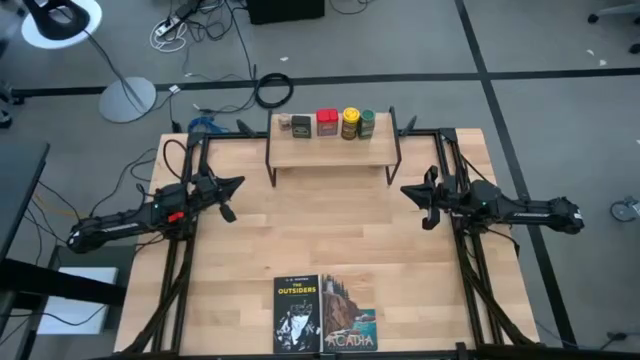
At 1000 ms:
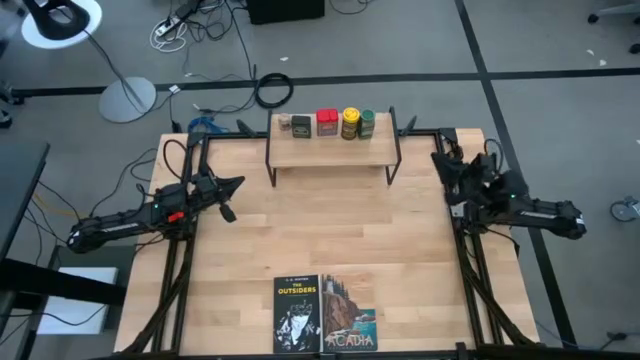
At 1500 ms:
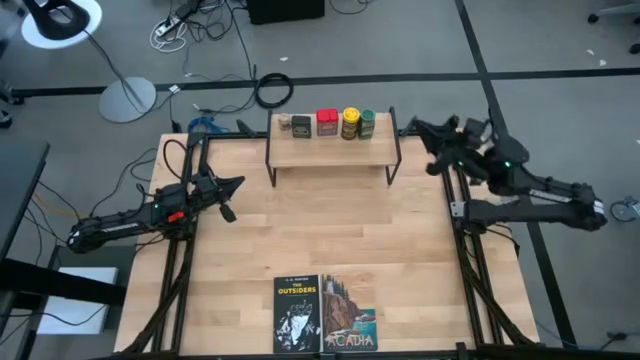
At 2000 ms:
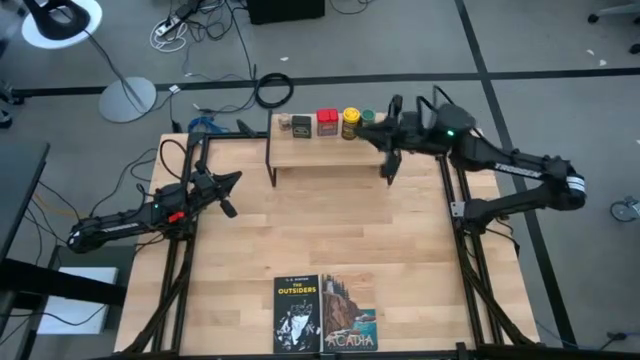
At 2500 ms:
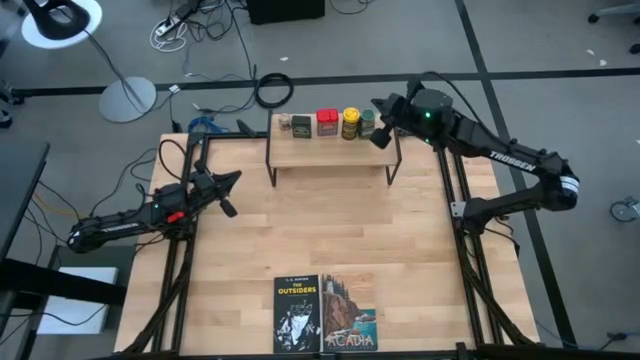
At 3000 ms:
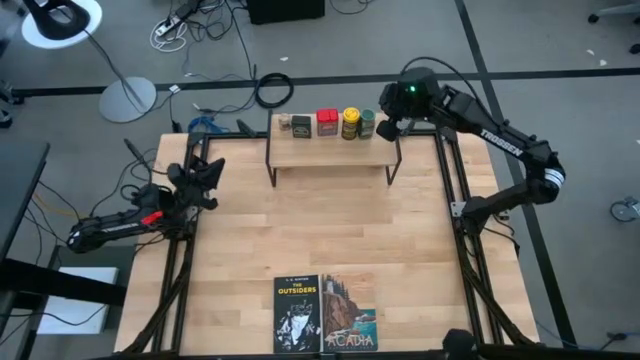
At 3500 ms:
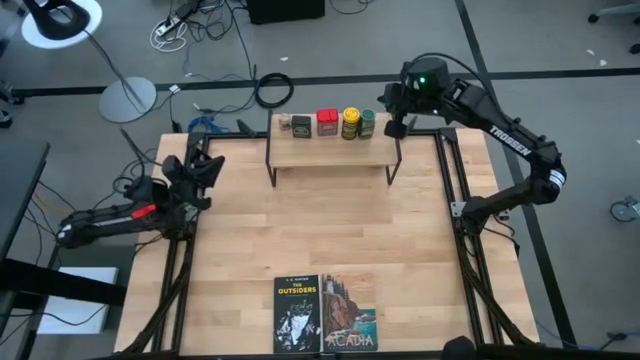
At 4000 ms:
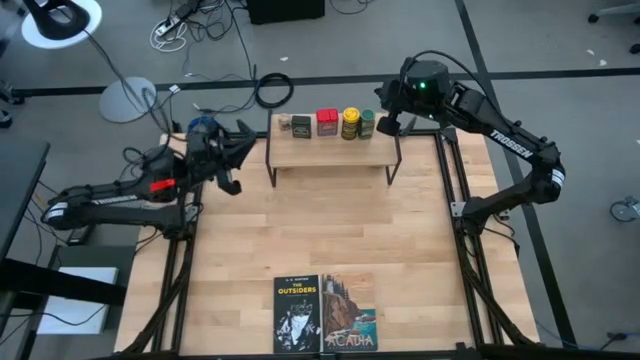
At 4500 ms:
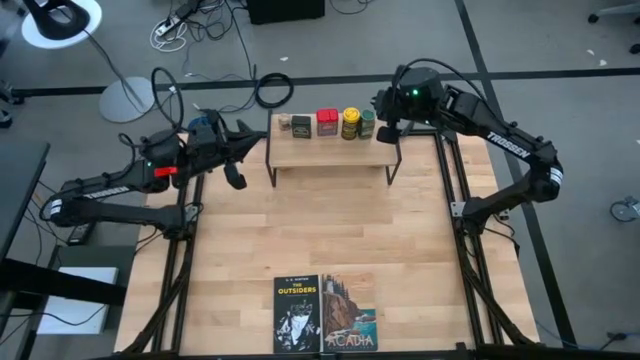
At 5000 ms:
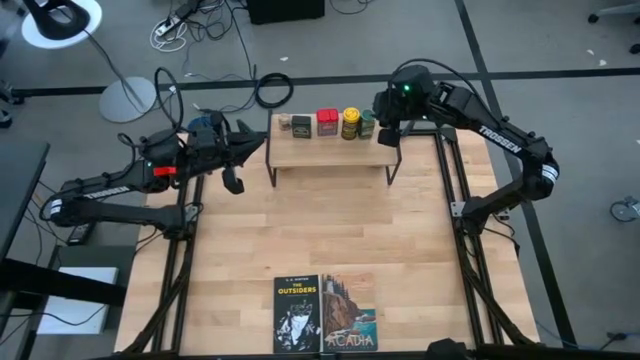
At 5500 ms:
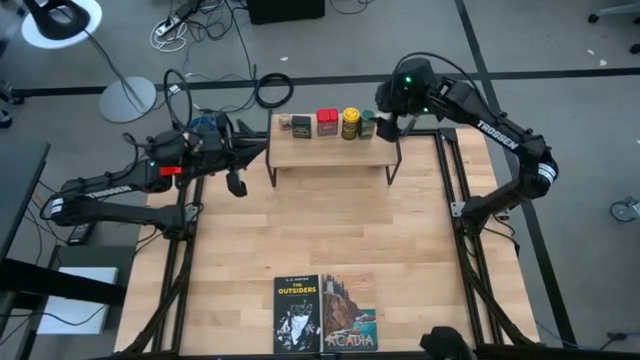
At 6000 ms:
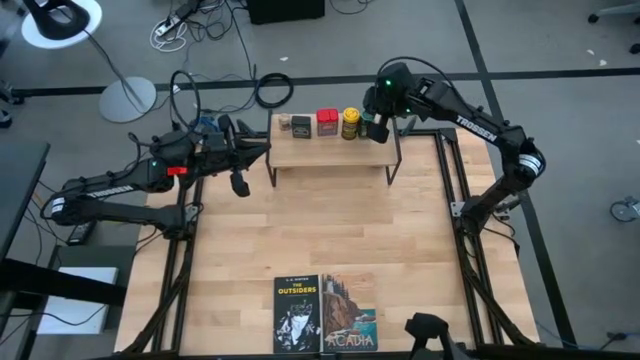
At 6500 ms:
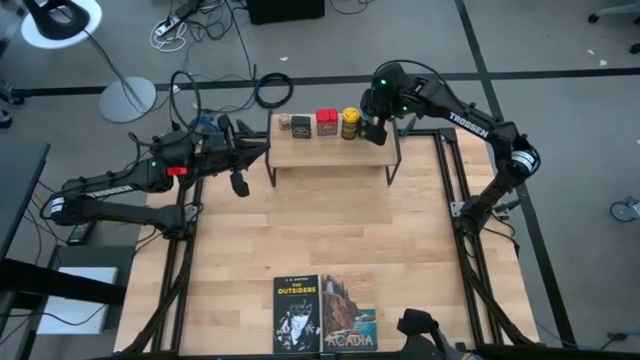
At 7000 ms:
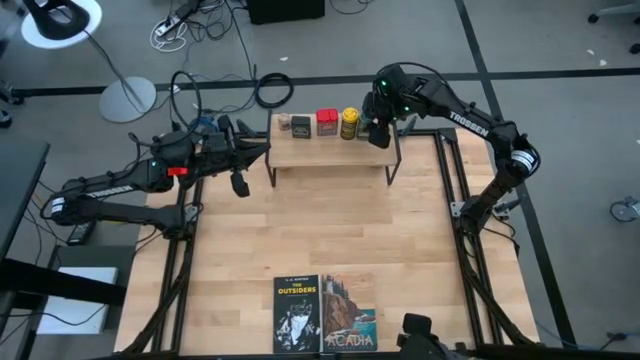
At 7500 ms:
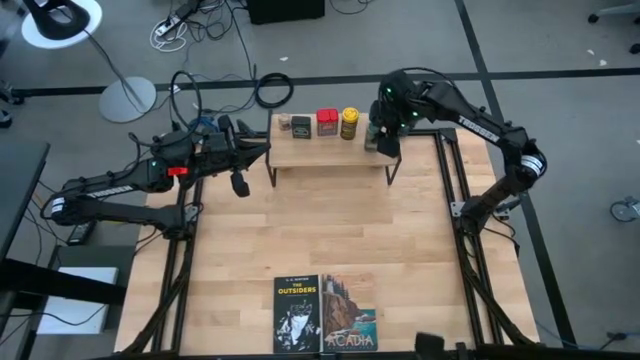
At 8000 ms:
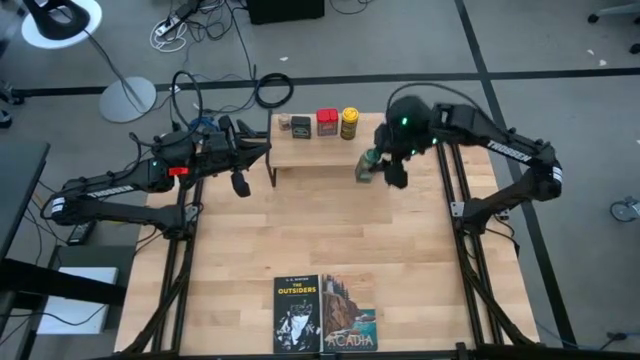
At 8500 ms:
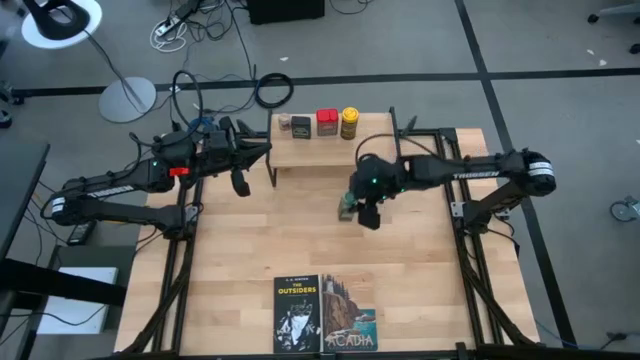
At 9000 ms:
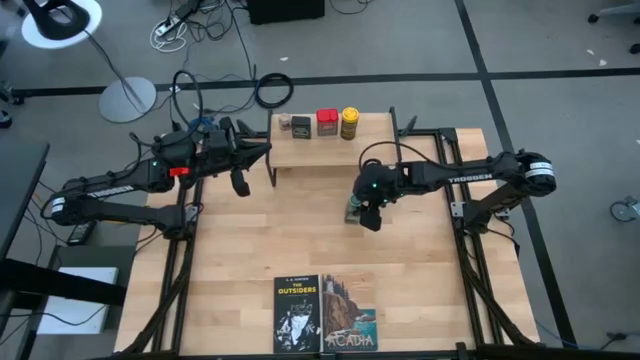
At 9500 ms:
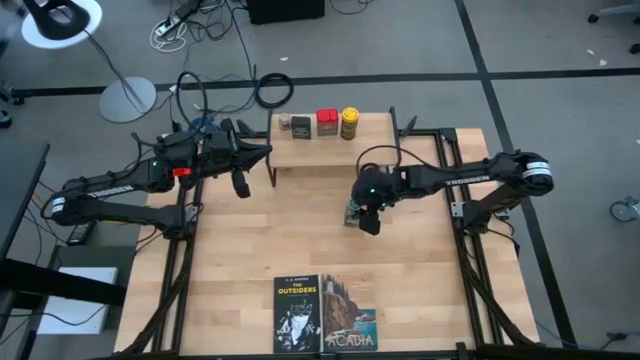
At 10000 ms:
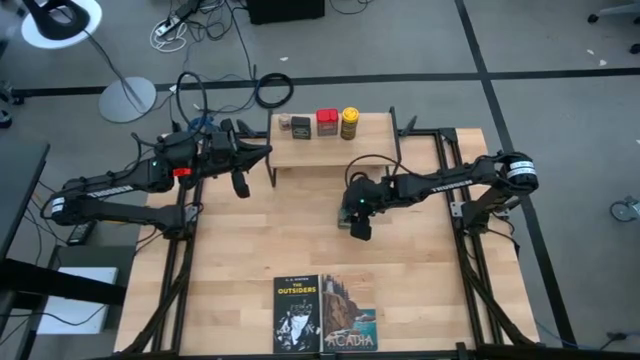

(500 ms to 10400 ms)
Task: Shelf spices
Remove the green seasoning bottle from the shelf

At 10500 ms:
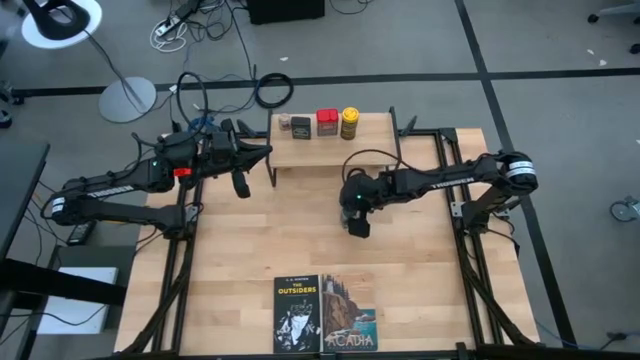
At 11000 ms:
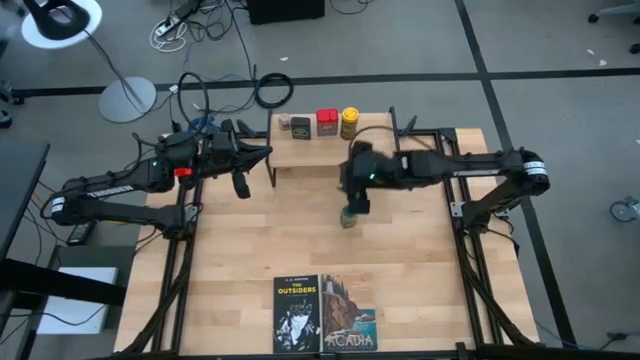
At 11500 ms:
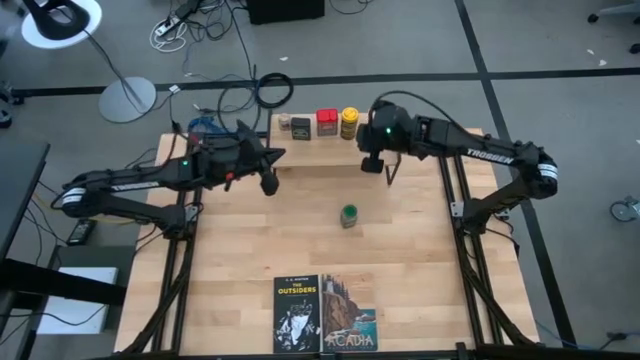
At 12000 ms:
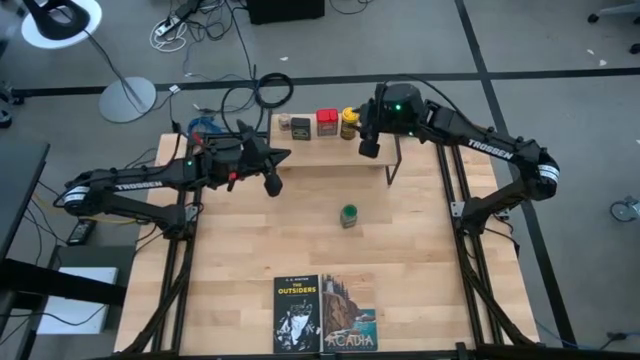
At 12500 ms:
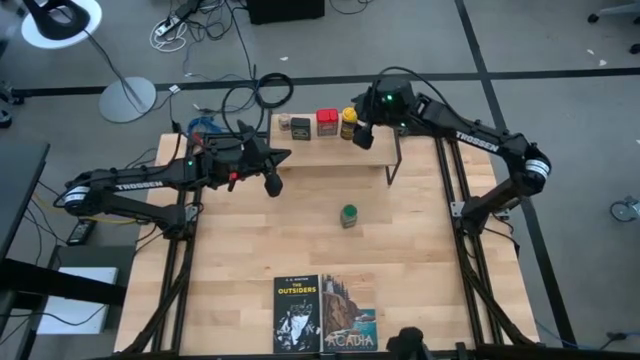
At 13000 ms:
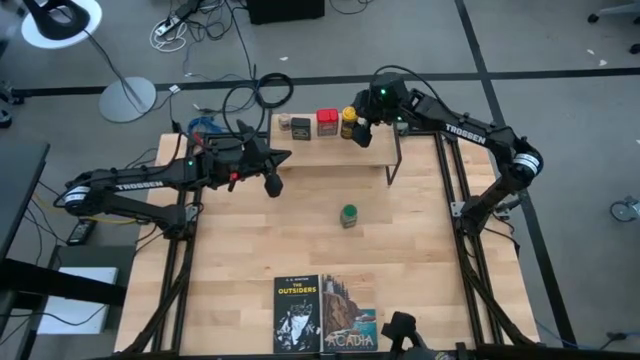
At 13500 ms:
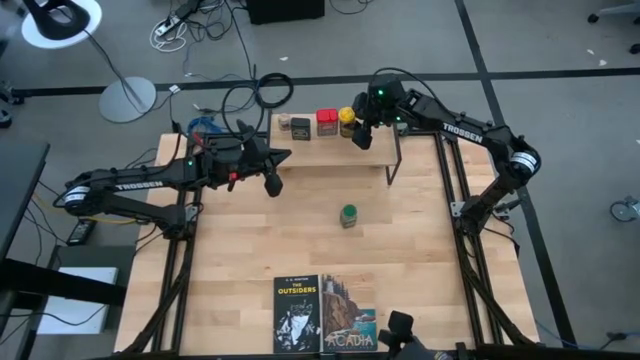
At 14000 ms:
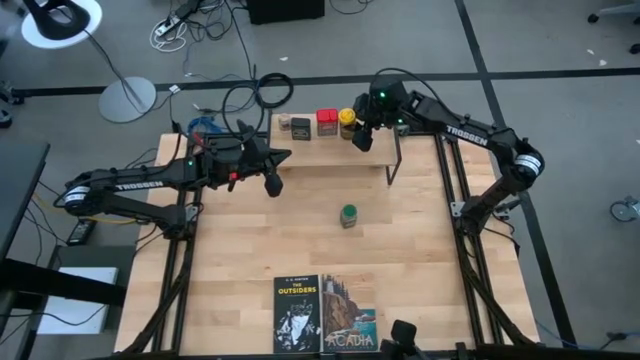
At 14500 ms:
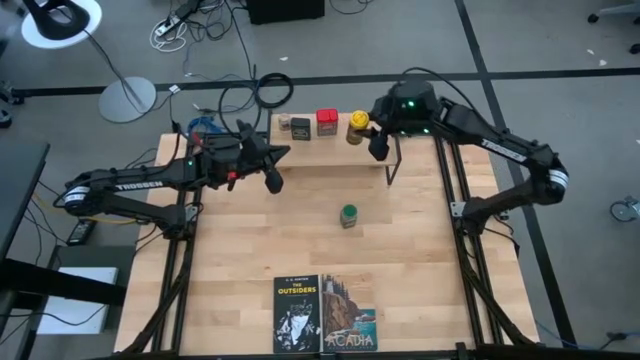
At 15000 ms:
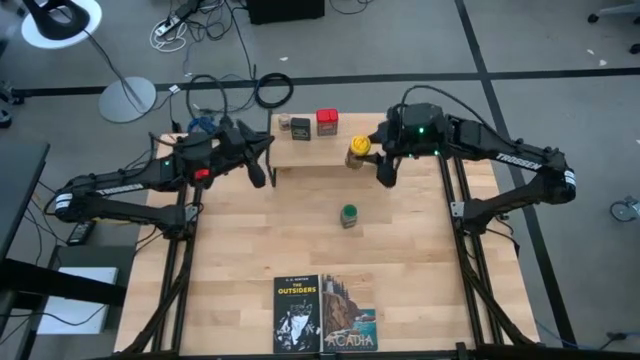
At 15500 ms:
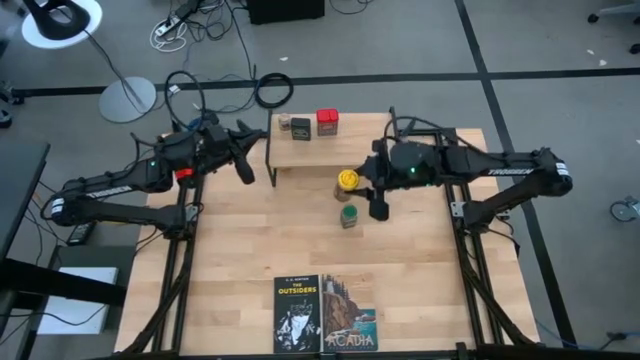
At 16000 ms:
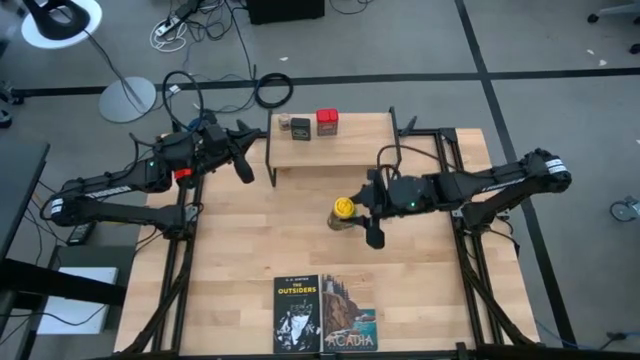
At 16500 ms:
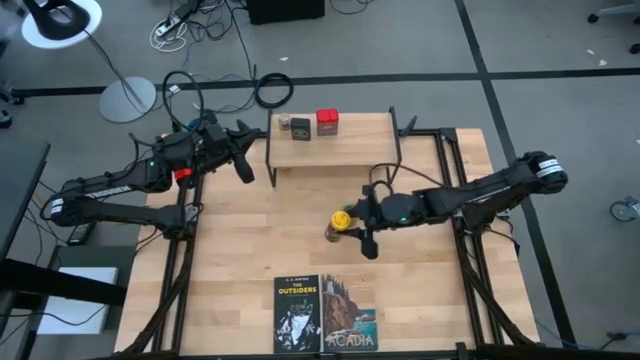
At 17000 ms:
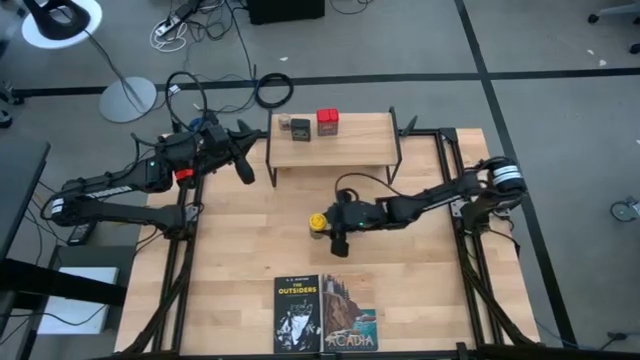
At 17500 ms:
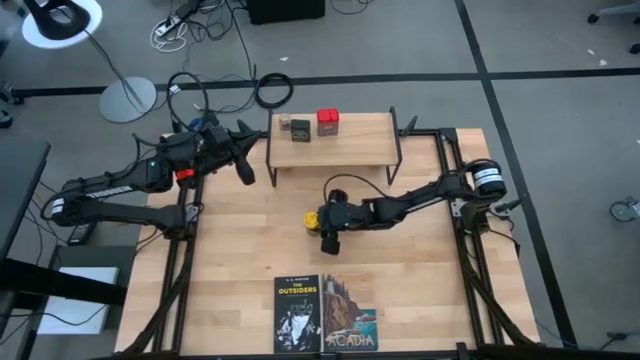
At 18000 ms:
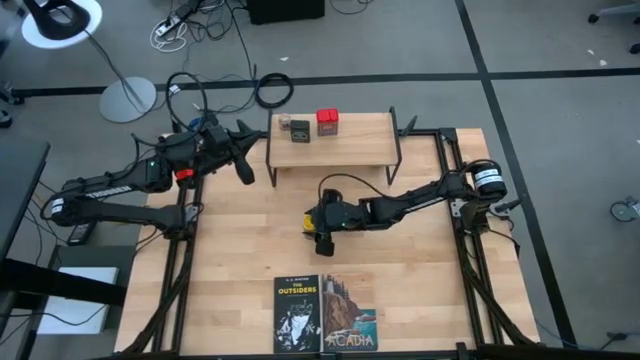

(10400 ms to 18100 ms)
Remove the yellow seasoning bottle from the shelf

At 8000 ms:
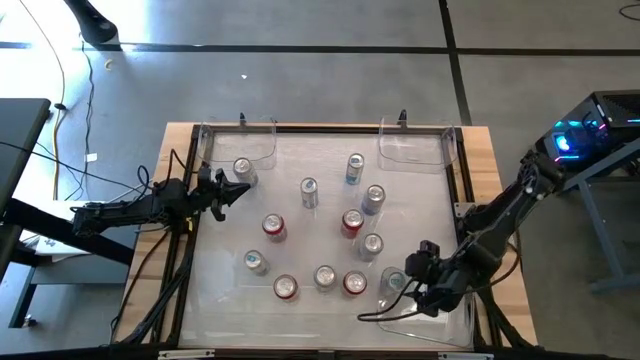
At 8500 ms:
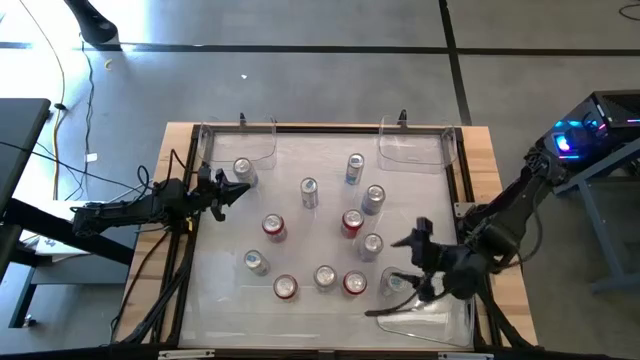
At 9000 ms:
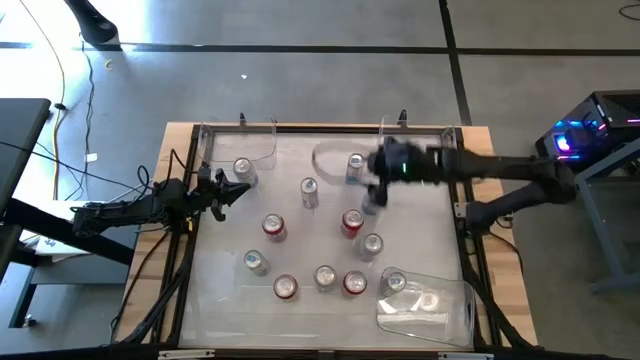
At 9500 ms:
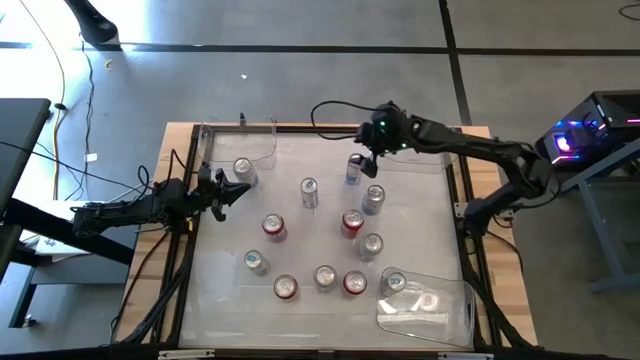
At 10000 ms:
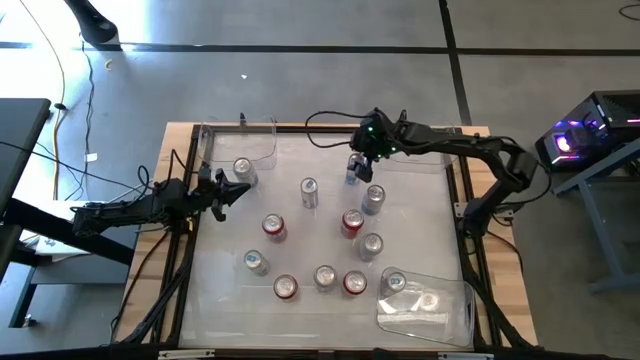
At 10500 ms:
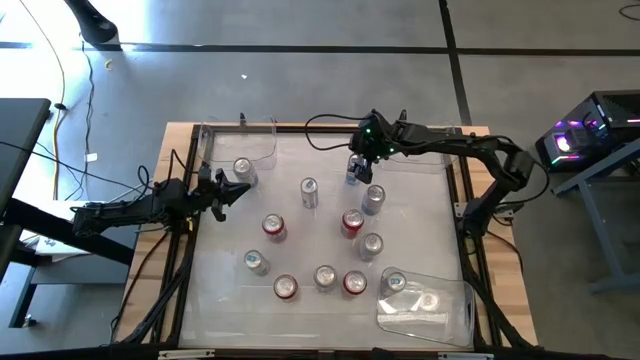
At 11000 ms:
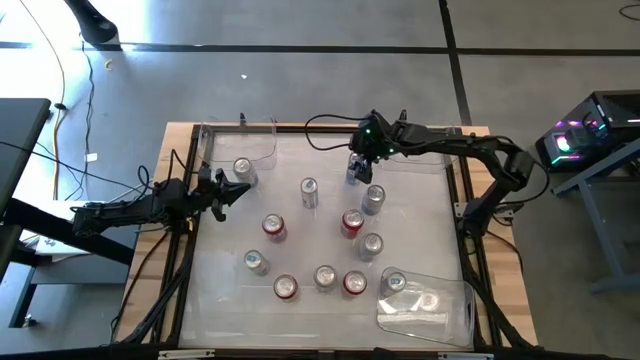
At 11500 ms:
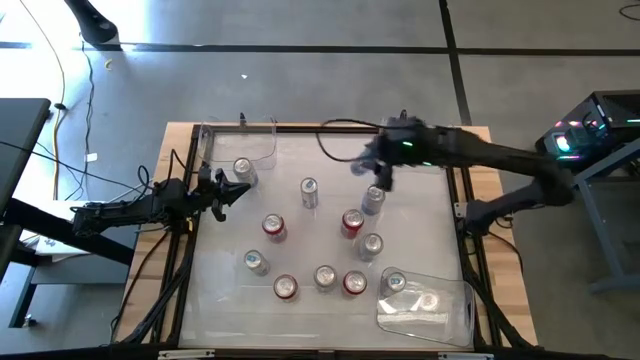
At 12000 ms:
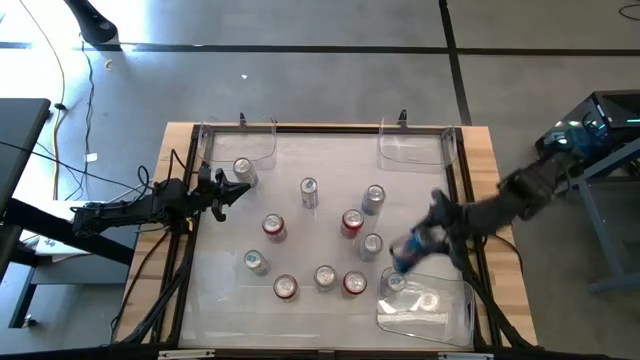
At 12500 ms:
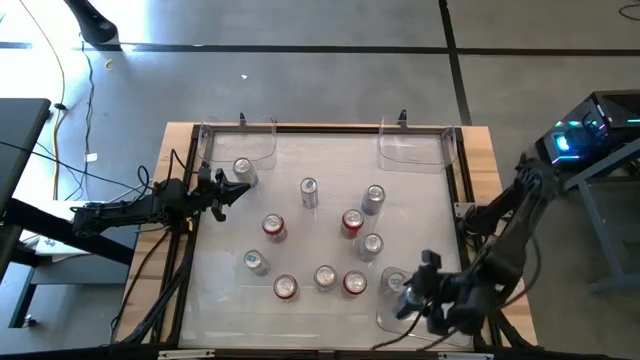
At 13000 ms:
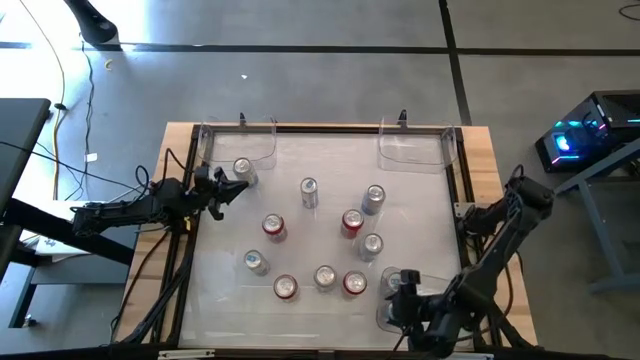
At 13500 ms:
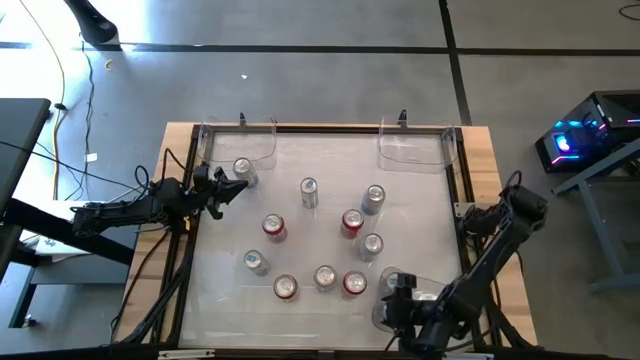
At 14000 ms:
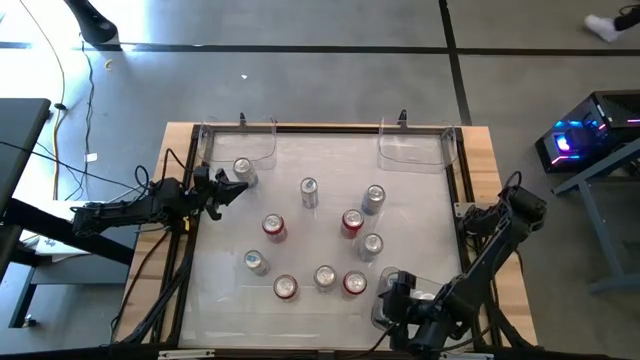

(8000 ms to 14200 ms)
Task: Sort soda cans
Put the blue soda can into the bottom transparent bin
